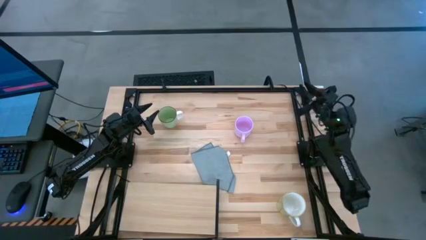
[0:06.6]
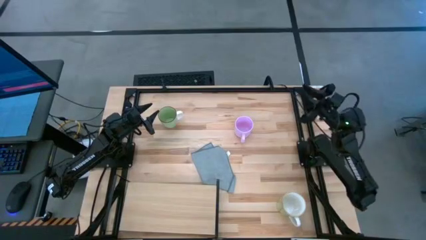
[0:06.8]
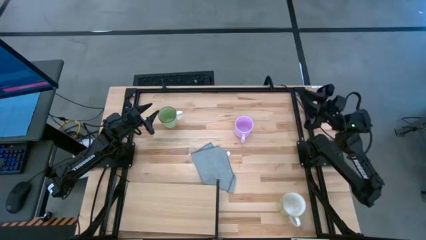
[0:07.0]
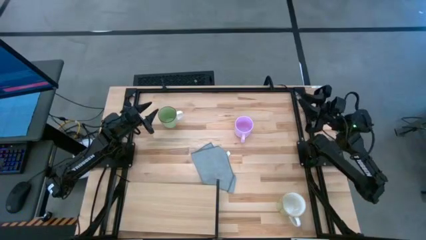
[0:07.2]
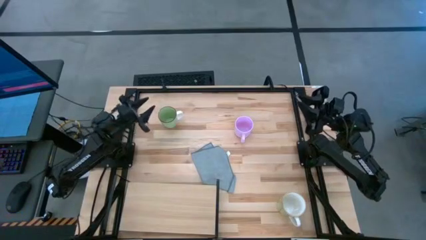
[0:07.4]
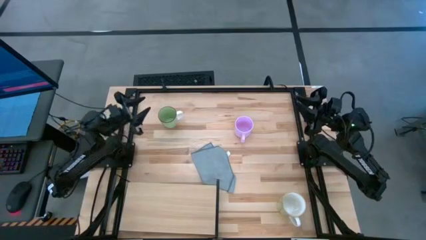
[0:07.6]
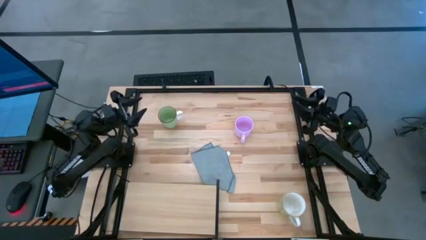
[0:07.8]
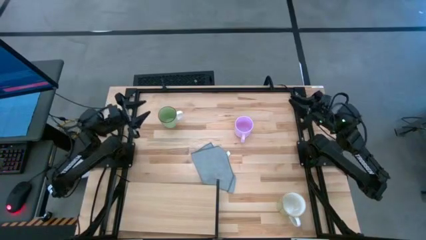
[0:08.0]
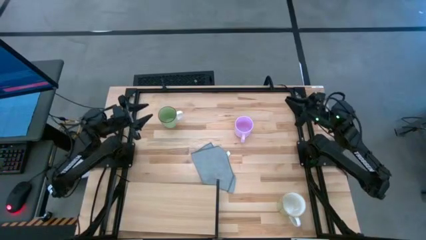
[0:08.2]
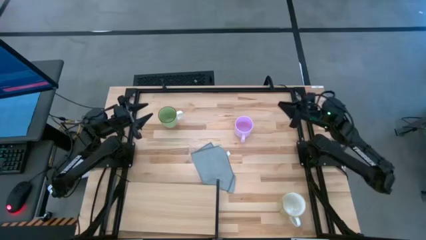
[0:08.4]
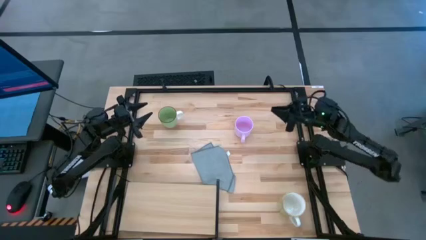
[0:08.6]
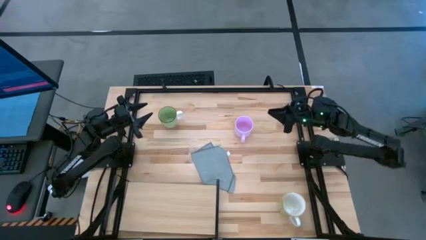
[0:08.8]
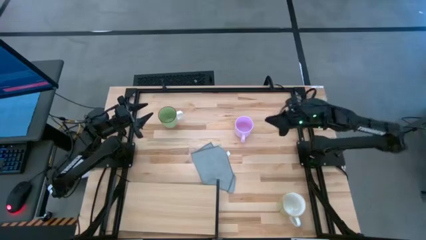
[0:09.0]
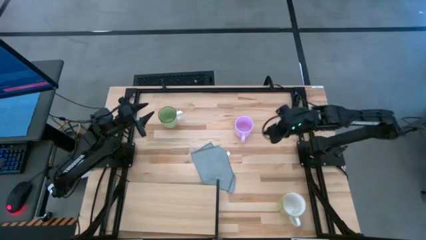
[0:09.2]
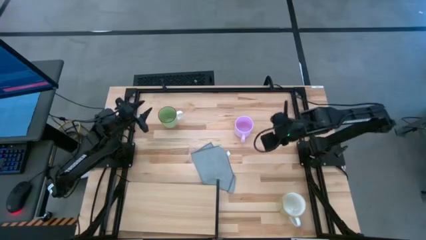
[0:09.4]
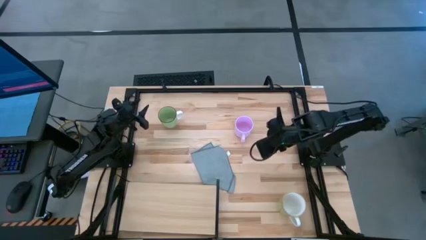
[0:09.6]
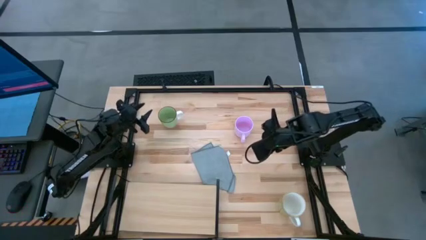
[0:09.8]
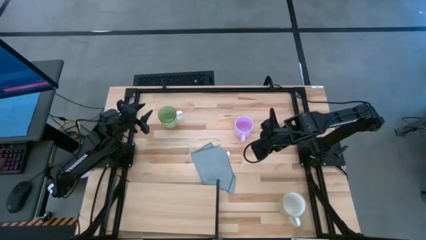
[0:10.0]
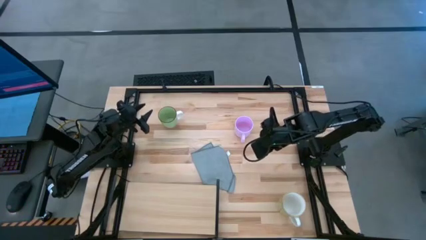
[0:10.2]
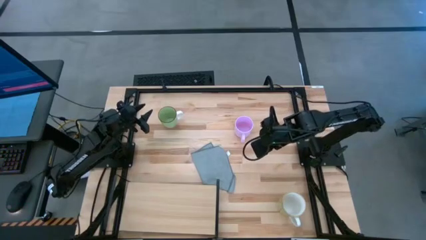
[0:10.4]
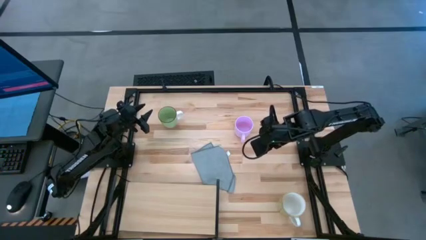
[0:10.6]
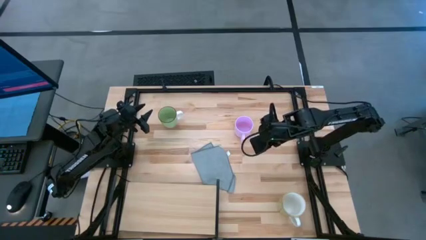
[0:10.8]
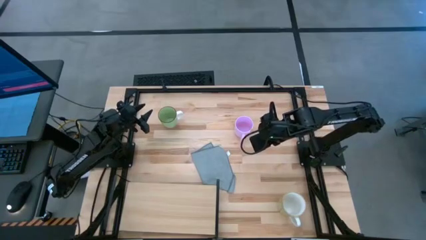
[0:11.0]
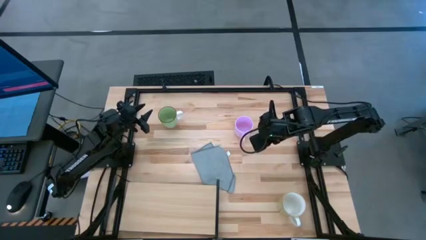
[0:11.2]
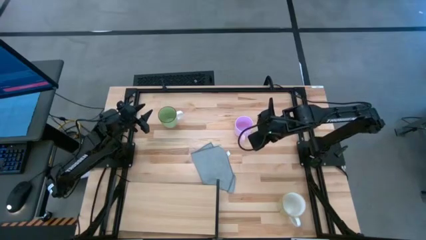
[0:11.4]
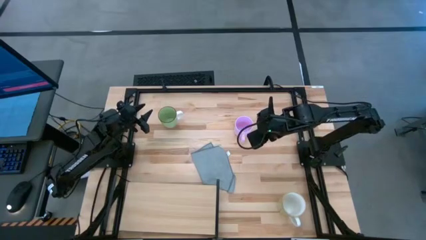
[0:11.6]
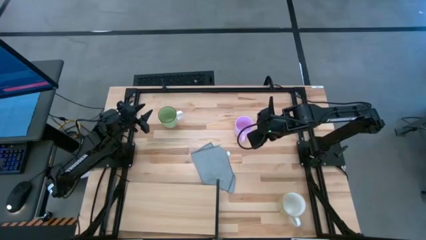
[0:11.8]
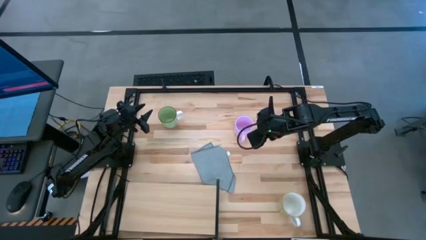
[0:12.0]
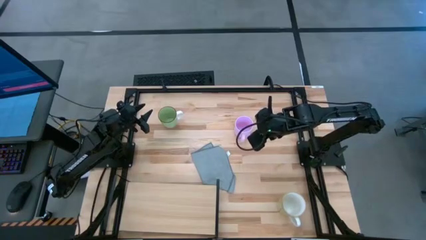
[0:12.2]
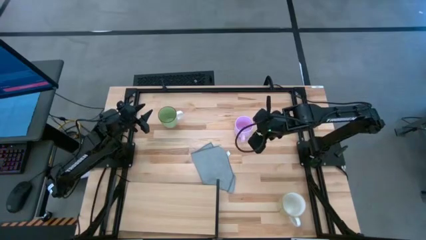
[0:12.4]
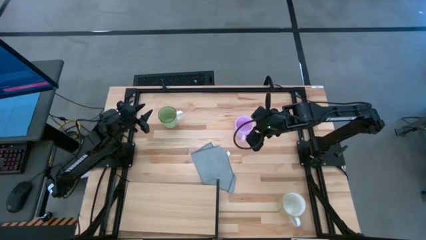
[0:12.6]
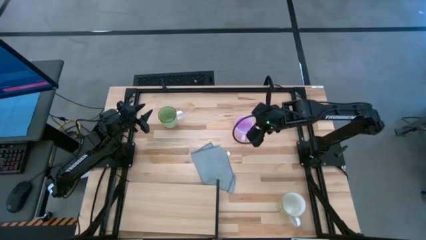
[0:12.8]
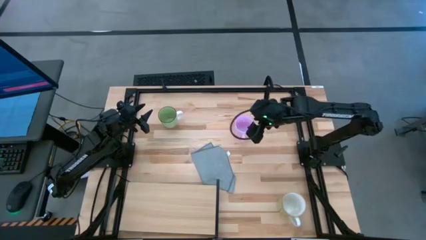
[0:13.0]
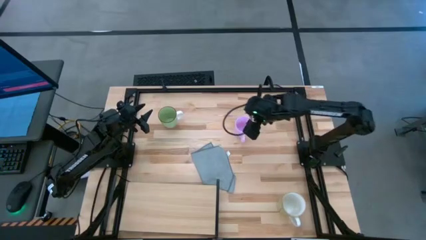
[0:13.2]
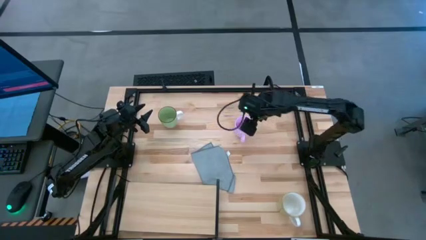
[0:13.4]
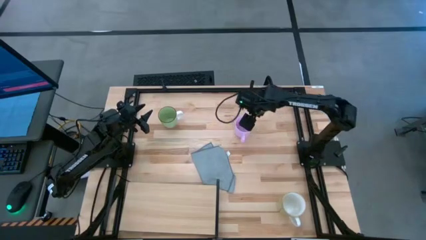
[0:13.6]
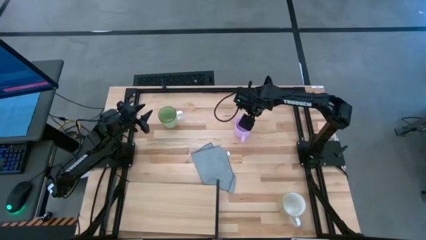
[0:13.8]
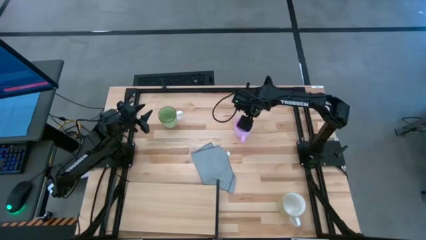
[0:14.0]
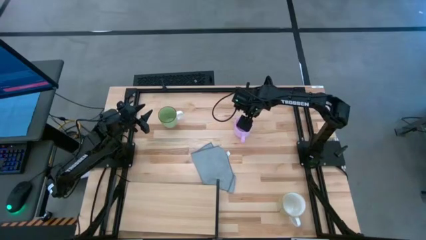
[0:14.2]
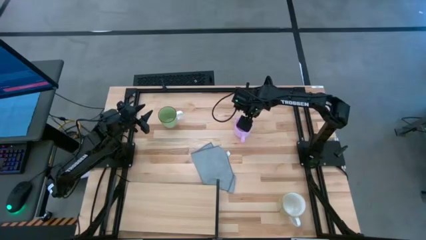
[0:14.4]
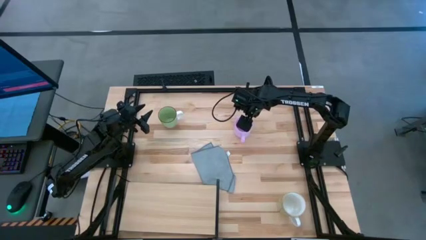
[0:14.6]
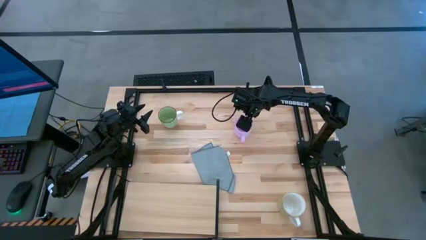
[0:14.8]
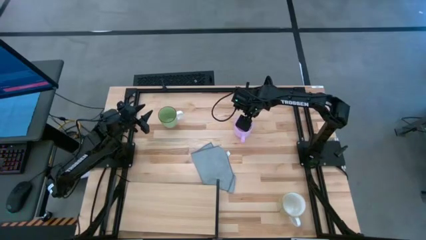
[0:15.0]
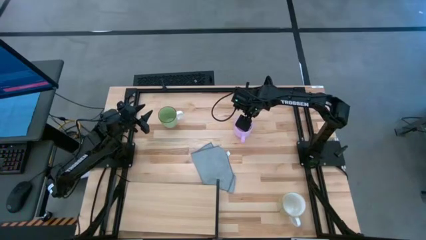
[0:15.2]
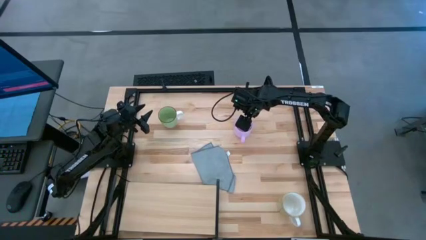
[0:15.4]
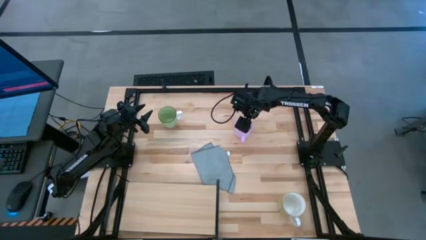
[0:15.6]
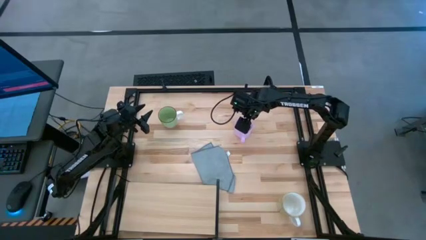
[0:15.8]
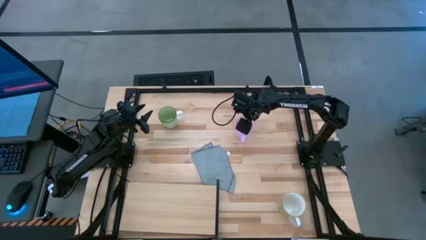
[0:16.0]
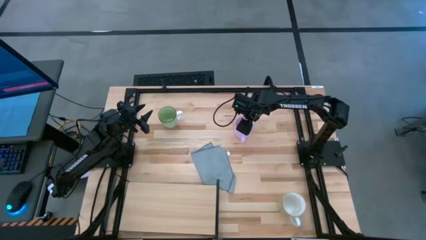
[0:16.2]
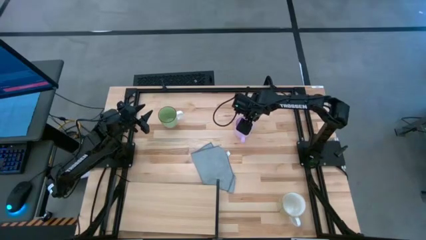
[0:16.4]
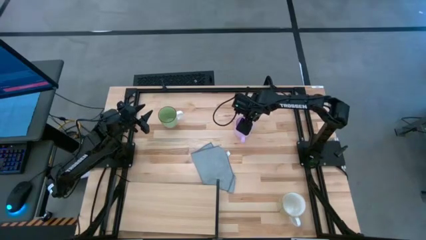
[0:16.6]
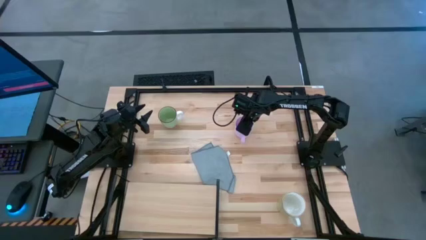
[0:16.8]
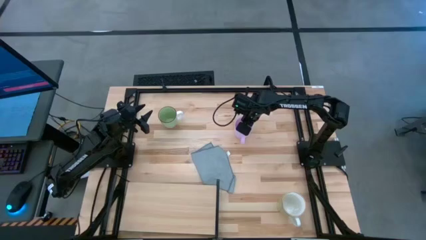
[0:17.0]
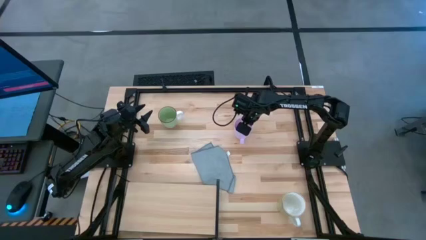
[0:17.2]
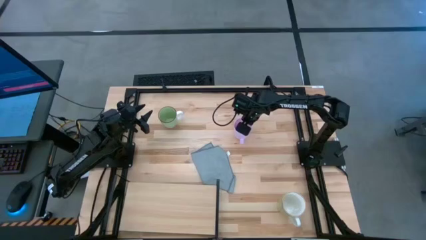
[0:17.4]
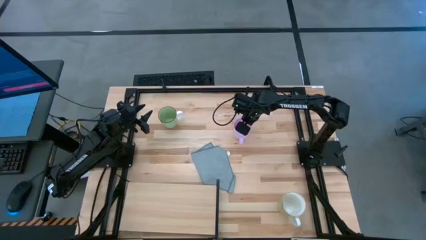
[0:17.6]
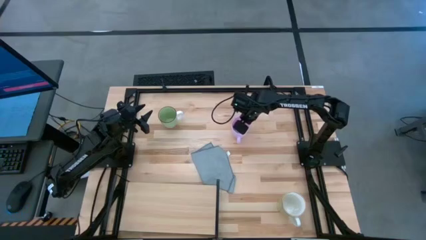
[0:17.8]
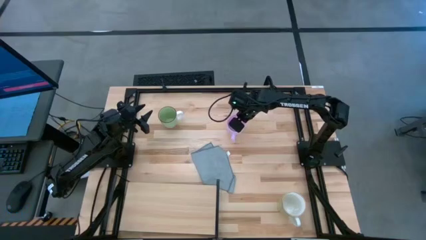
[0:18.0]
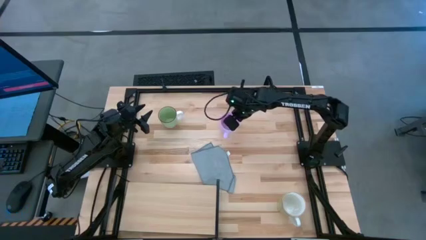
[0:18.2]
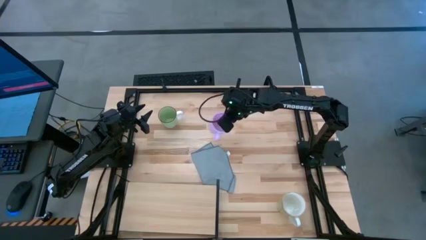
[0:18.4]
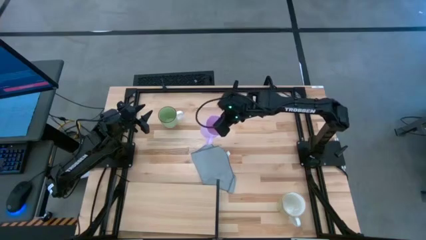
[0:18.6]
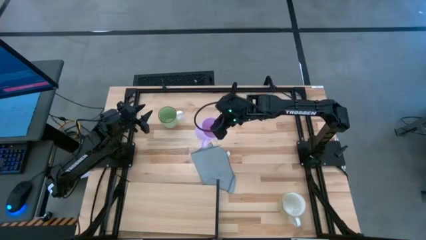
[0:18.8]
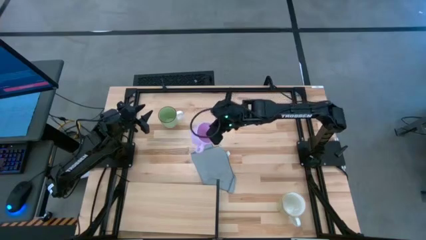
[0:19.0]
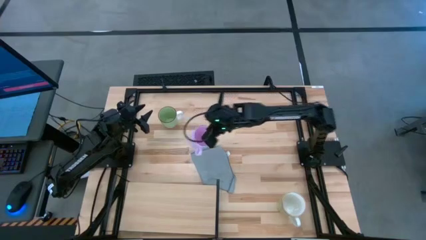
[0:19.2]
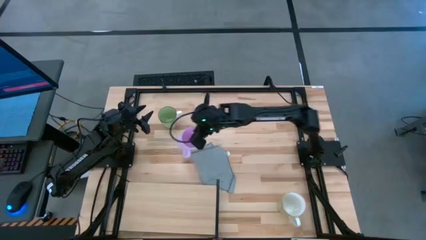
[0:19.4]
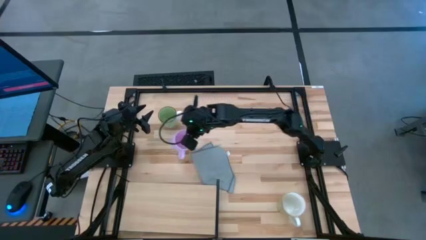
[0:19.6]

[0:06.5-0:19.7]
Task: Stack small to large cups/mugs on shelf
Put the pink mug on the shelf
